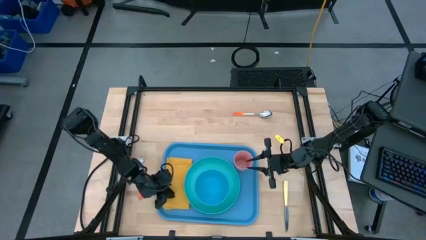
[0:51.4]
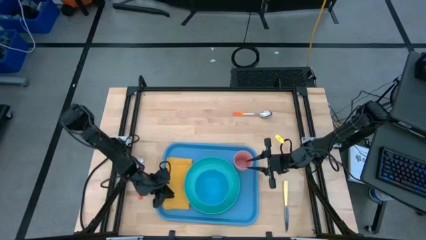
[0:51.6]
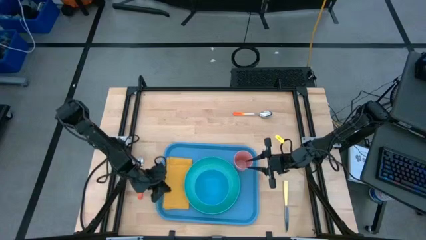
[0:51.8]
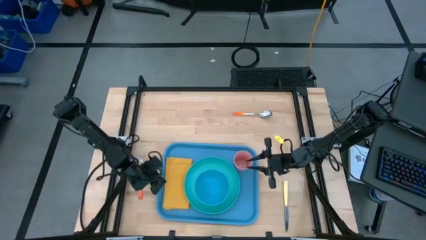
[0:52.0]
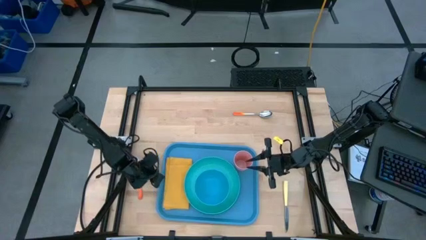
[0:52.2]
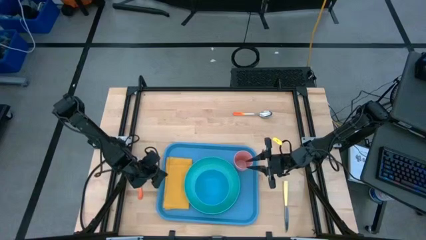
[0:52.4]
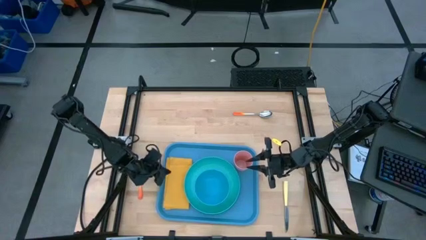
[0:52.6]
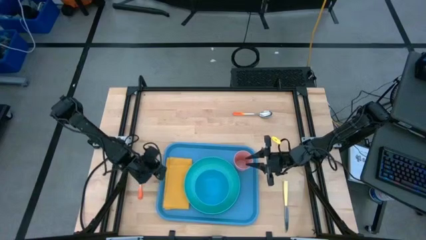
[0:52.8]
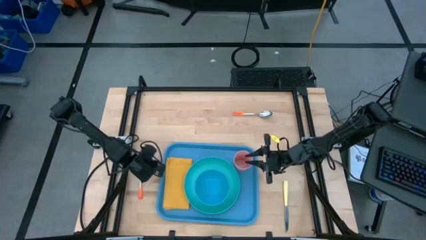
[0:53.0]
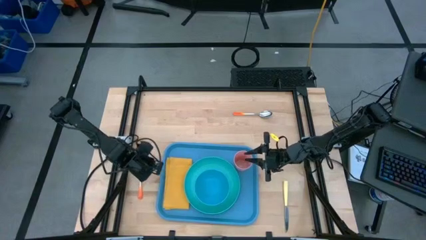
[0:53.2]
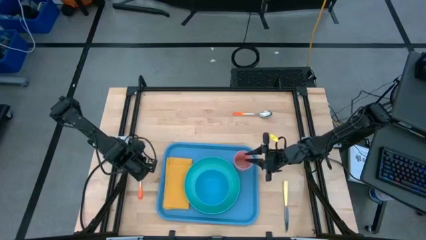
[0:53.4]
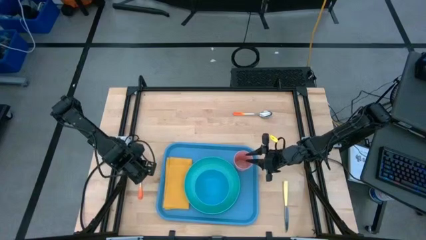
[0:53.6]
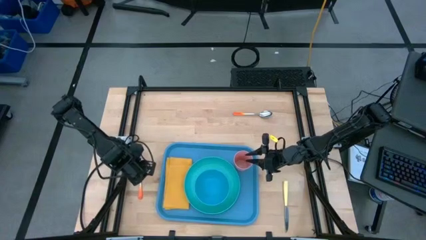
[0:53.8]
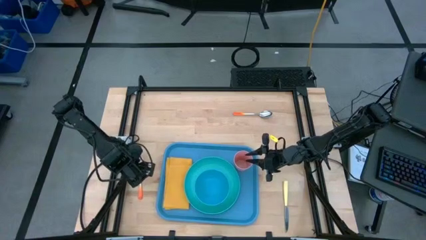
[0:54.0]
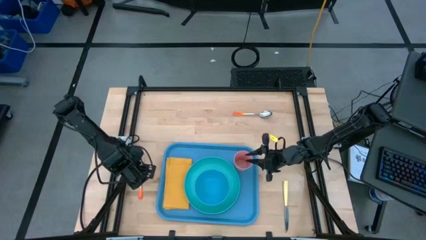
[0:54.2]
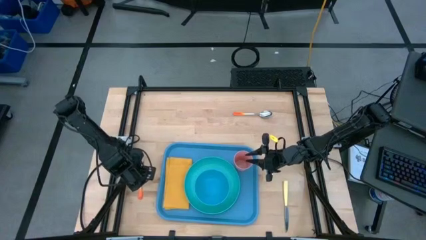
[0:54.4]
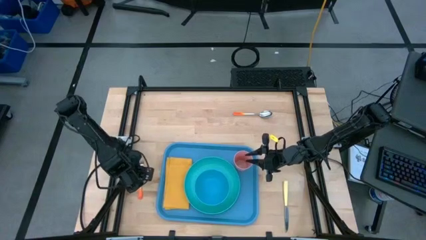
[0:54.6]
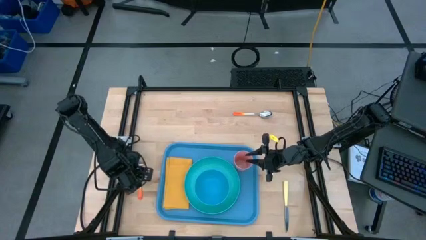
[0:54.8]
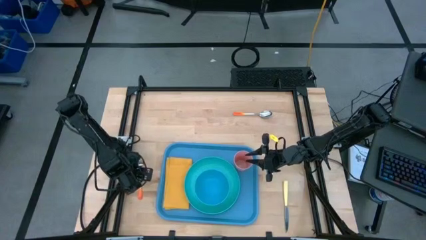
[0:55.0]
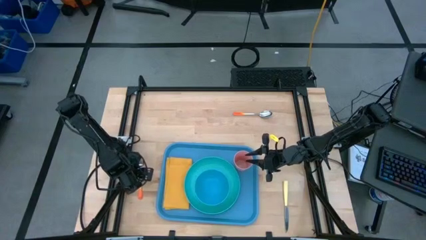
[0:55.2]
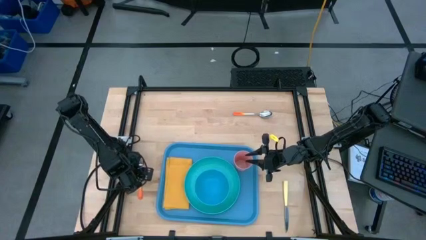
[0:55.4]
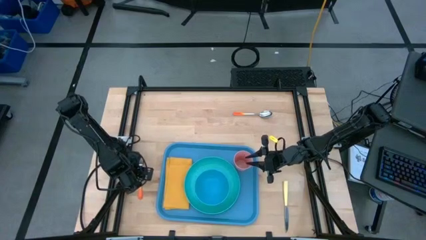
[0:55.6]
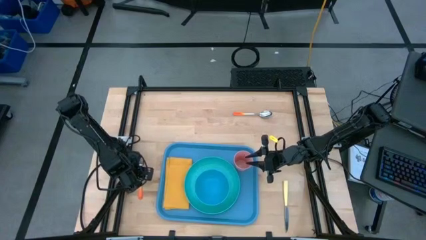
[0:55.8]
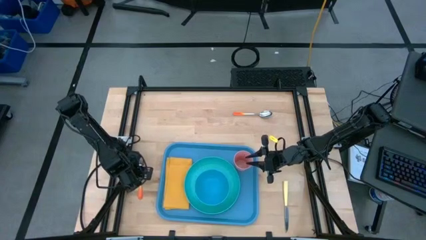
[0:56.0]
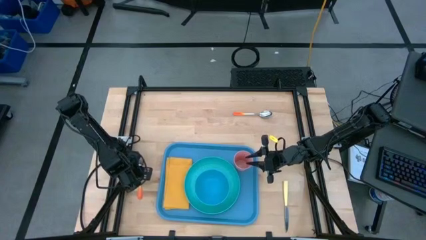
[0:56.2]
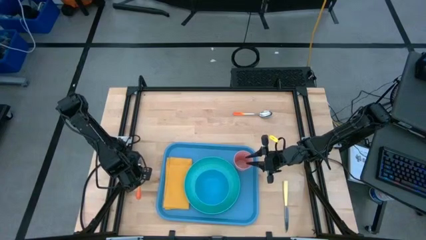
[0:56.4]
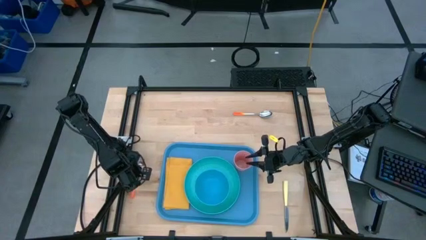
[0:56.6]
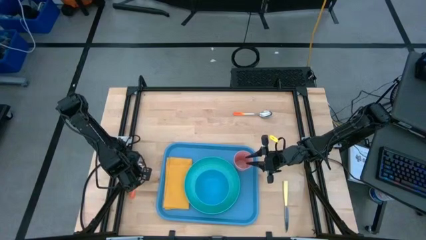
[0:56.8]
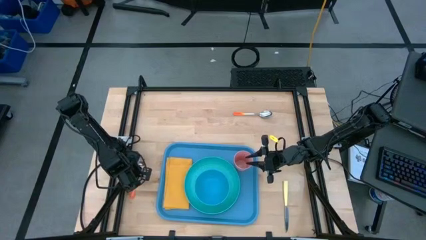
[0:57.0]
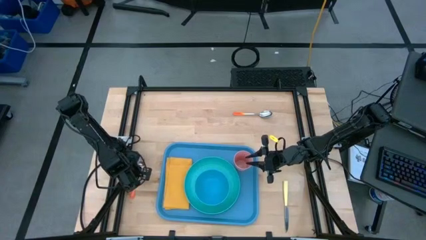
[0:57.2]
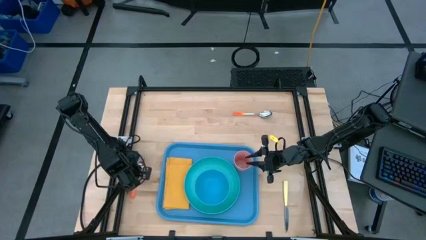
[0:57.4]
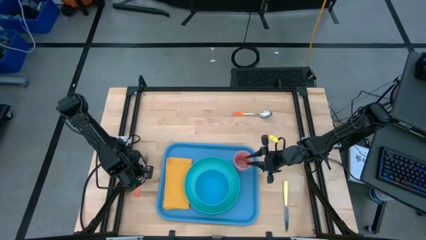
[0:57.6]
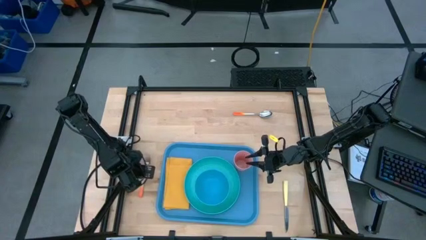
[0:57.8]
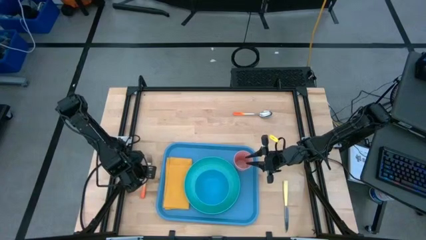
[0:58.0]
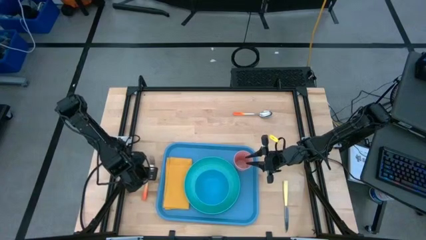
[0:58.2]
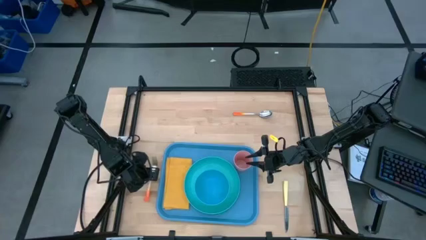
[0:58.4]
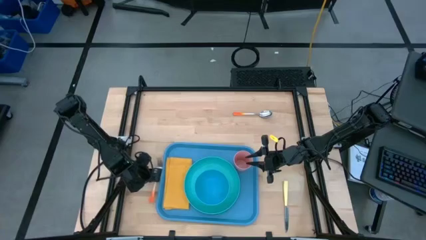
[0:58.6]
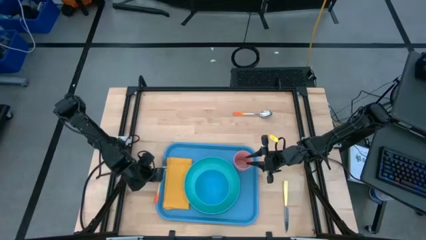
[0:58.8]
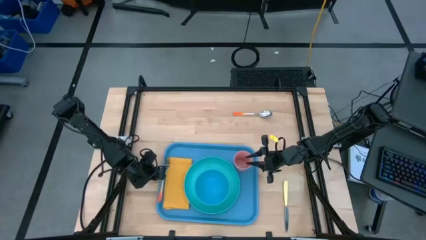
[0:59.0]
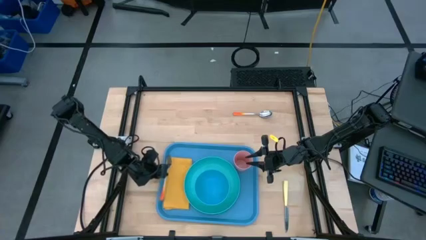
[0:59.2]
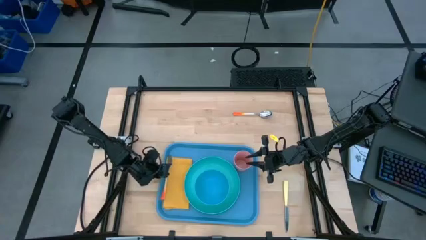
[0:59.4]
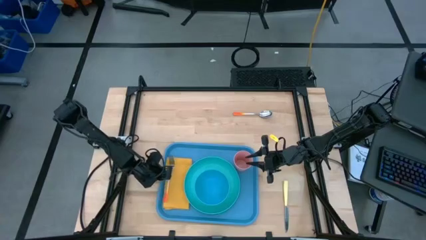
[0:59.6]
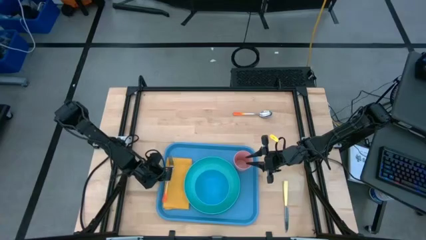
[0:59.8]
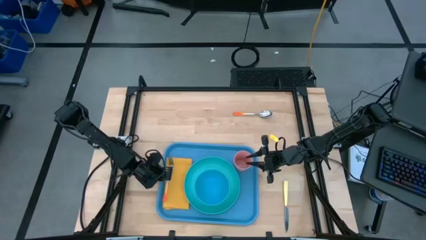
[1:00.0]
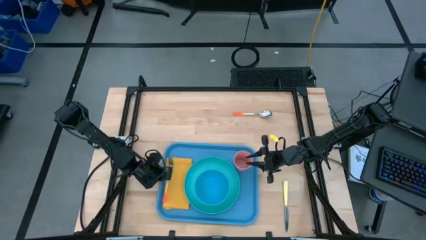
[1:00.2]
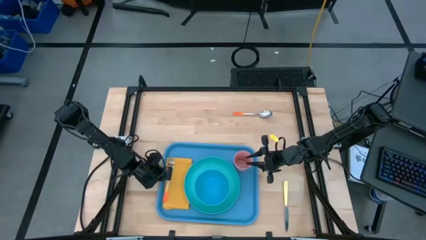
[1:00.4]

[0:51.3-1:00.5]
Task: Set up tray
Put the orange fork on the yellow napkin
